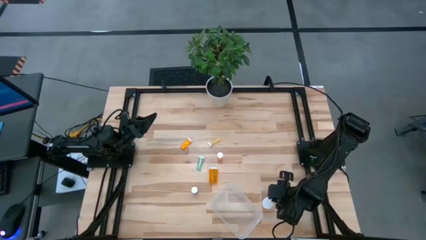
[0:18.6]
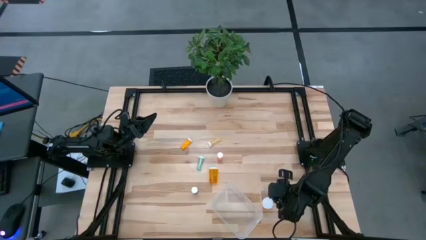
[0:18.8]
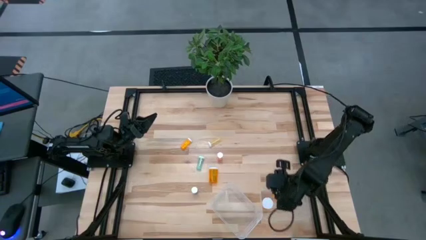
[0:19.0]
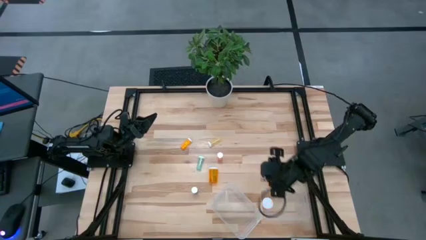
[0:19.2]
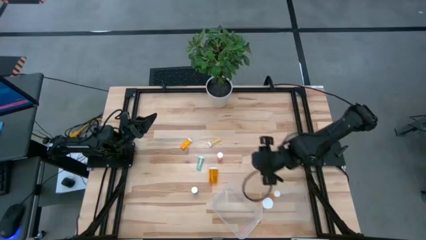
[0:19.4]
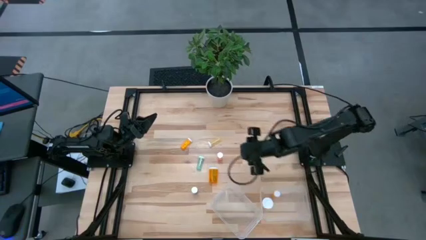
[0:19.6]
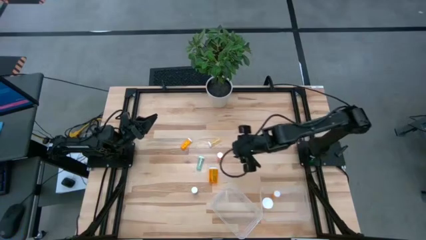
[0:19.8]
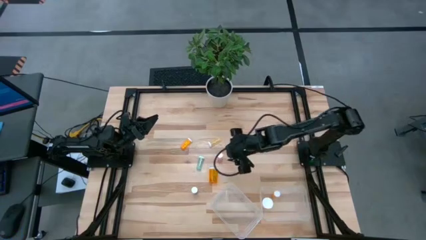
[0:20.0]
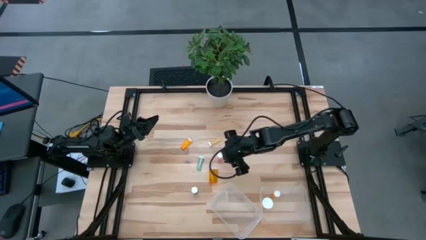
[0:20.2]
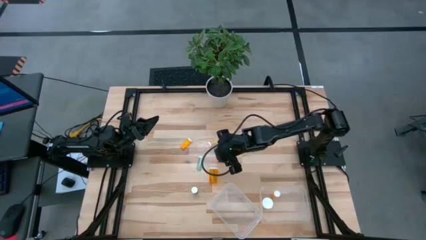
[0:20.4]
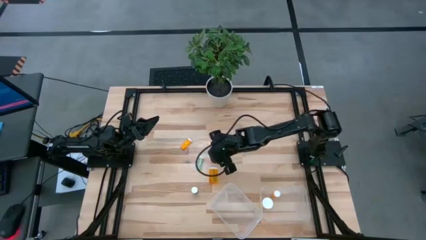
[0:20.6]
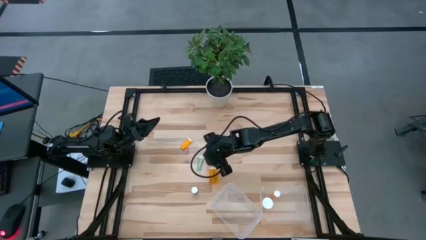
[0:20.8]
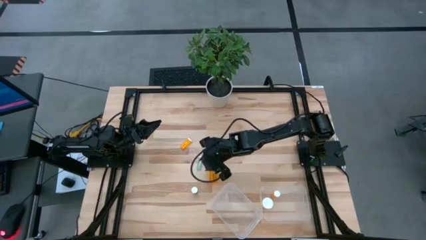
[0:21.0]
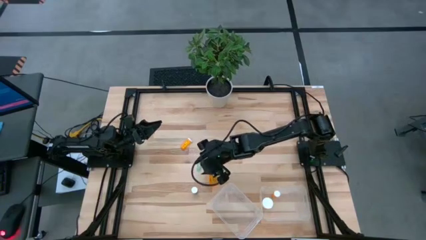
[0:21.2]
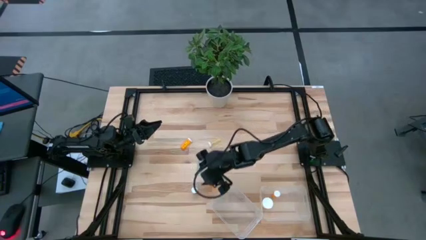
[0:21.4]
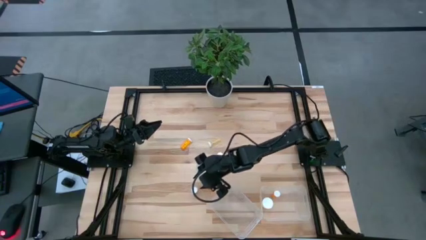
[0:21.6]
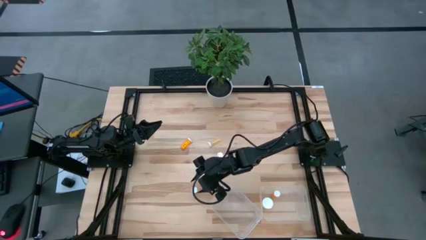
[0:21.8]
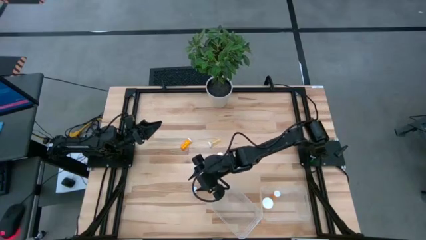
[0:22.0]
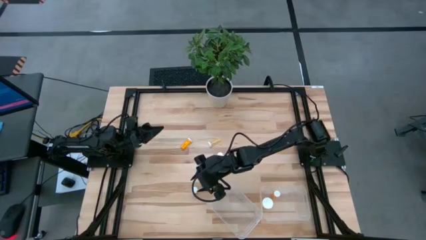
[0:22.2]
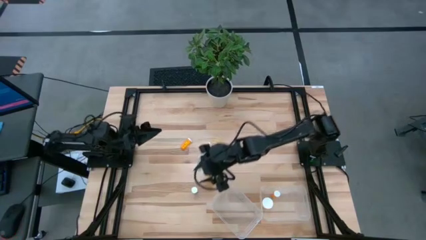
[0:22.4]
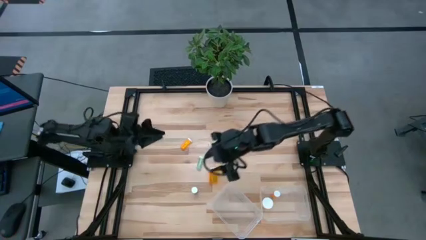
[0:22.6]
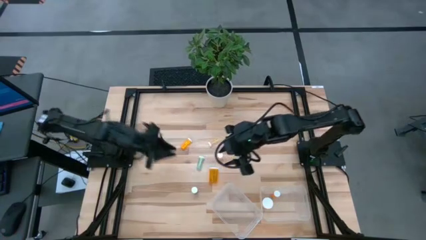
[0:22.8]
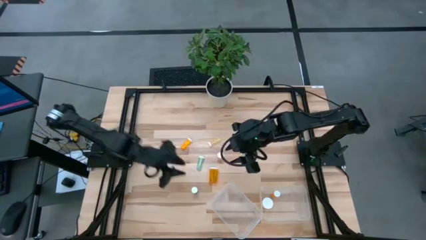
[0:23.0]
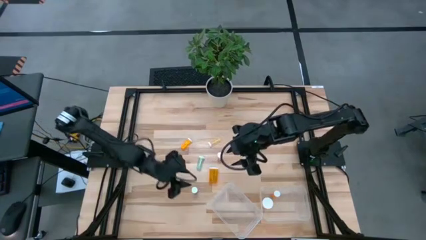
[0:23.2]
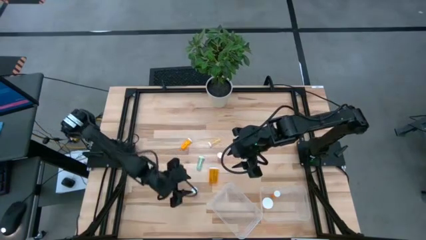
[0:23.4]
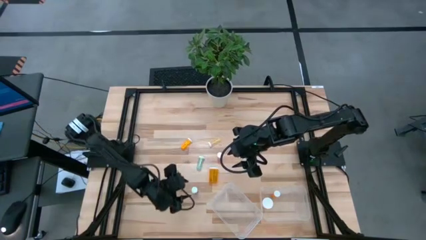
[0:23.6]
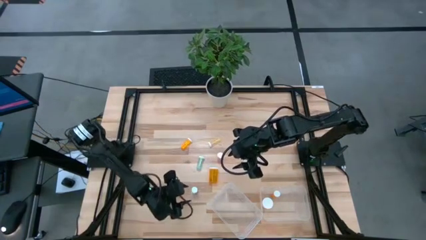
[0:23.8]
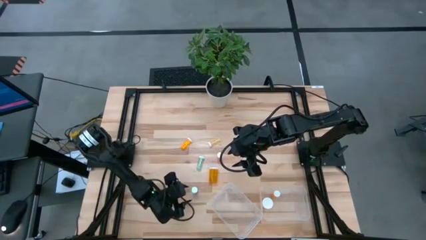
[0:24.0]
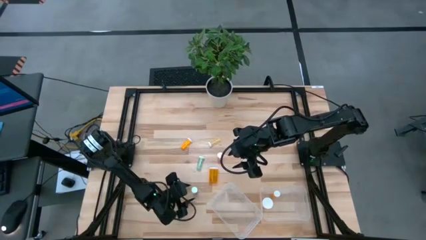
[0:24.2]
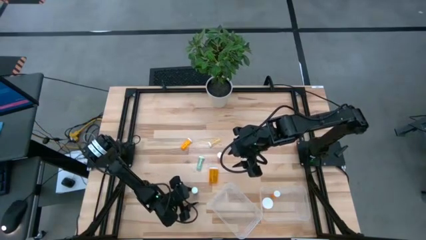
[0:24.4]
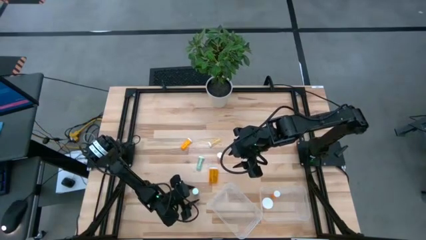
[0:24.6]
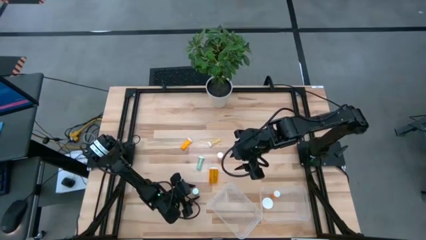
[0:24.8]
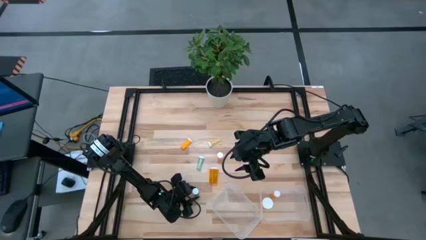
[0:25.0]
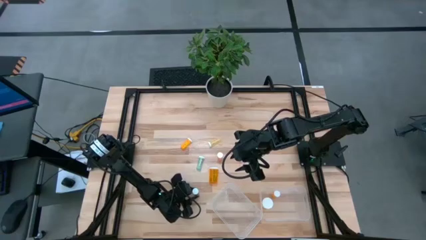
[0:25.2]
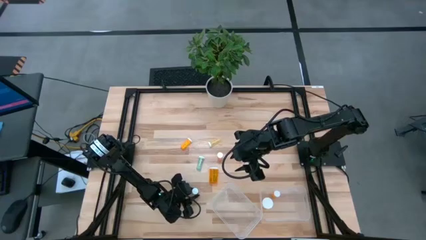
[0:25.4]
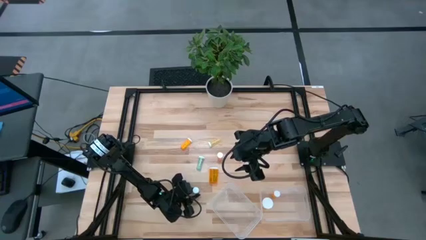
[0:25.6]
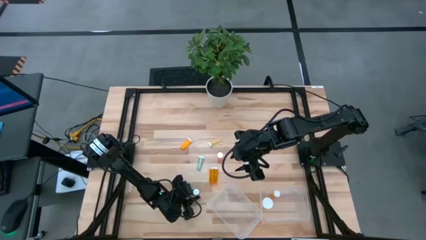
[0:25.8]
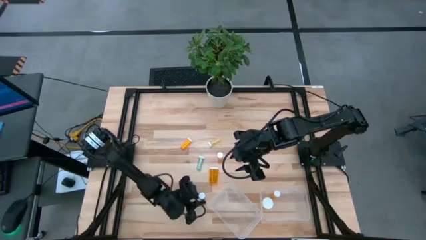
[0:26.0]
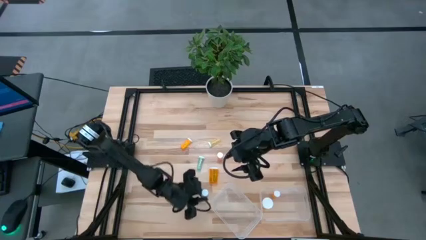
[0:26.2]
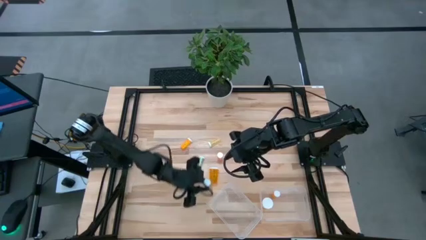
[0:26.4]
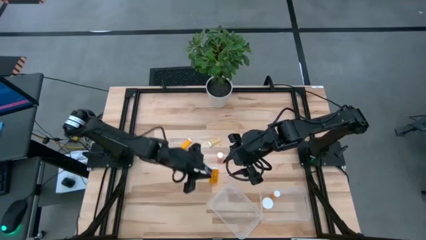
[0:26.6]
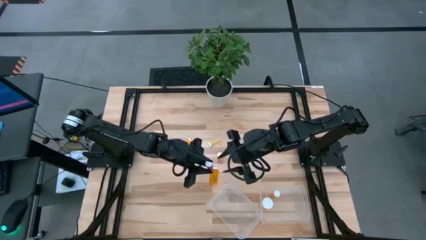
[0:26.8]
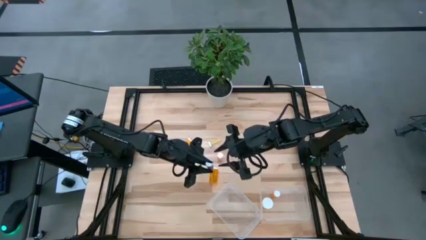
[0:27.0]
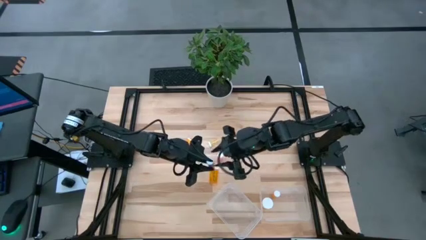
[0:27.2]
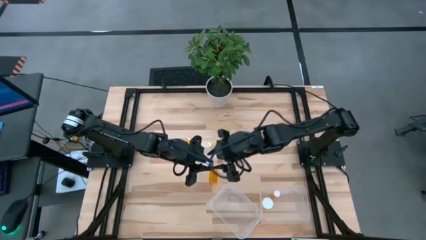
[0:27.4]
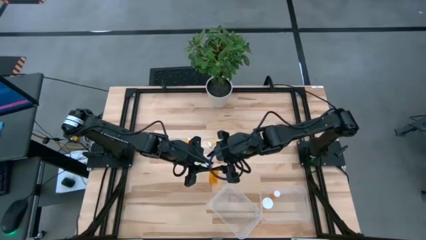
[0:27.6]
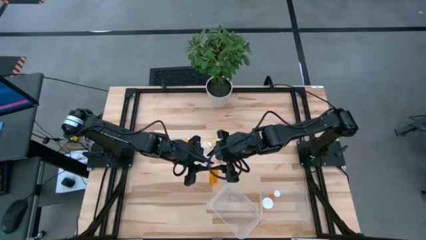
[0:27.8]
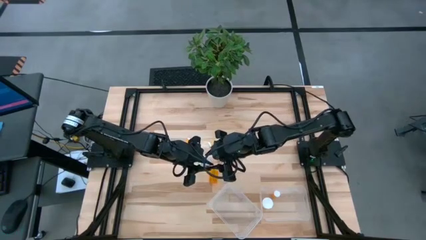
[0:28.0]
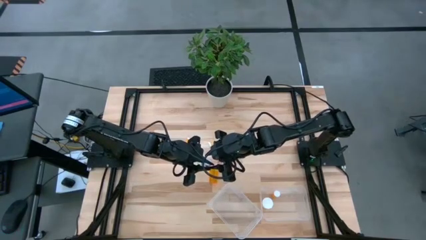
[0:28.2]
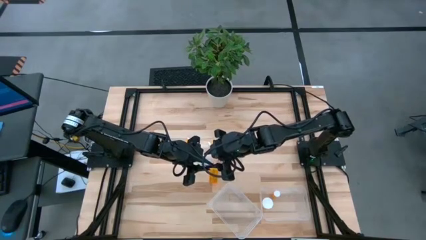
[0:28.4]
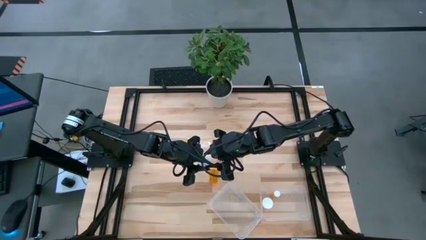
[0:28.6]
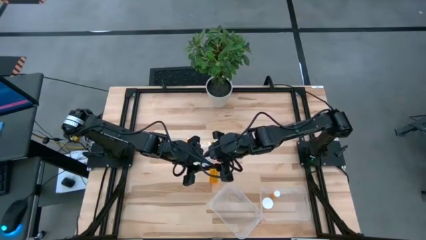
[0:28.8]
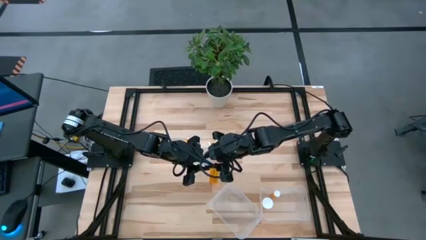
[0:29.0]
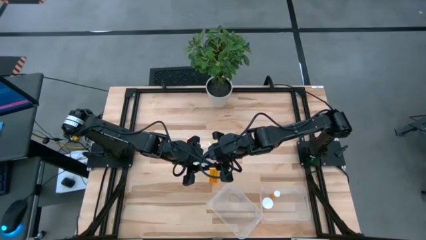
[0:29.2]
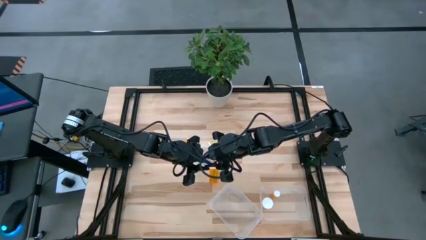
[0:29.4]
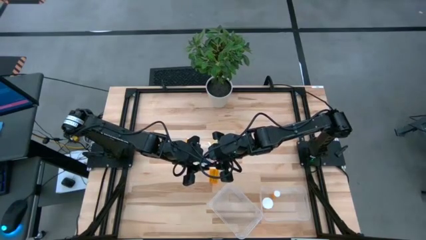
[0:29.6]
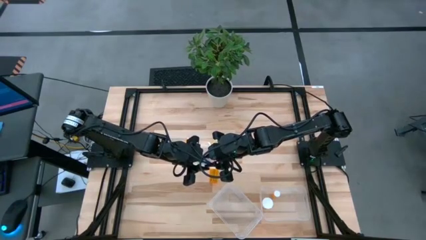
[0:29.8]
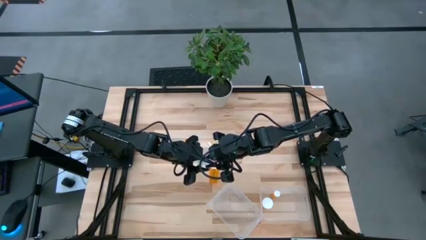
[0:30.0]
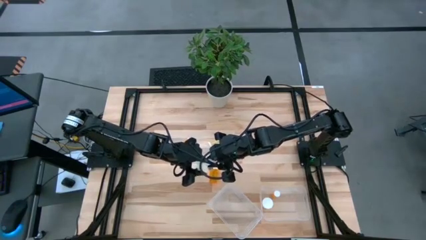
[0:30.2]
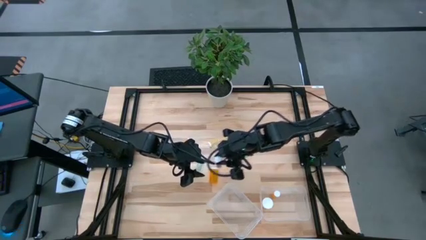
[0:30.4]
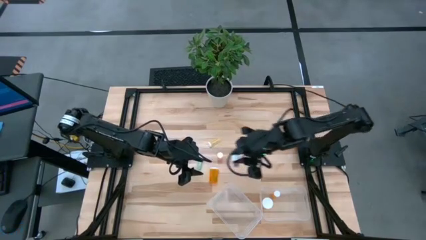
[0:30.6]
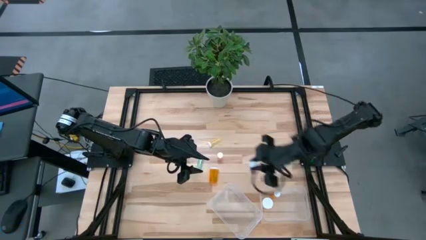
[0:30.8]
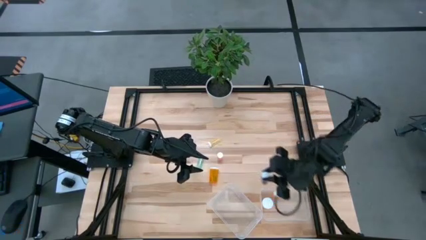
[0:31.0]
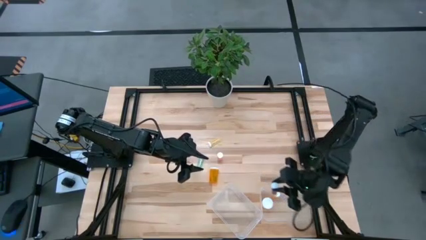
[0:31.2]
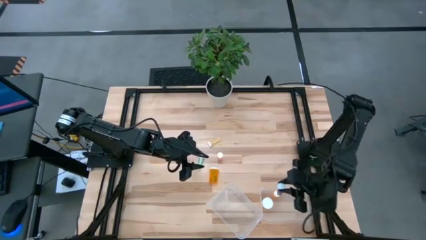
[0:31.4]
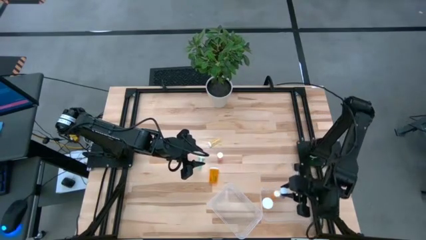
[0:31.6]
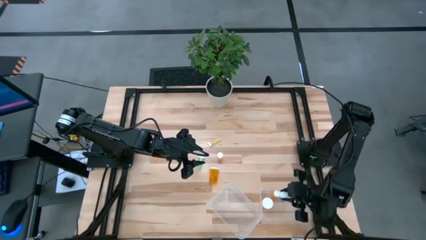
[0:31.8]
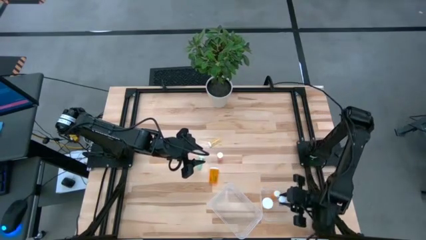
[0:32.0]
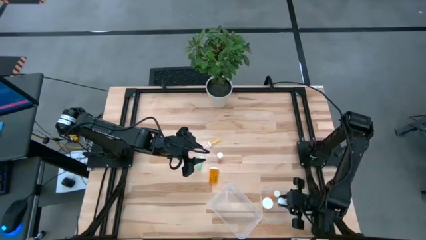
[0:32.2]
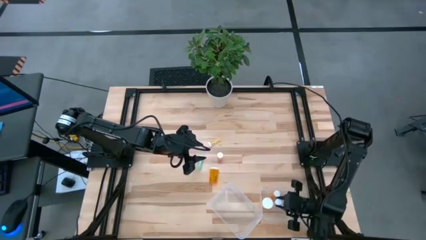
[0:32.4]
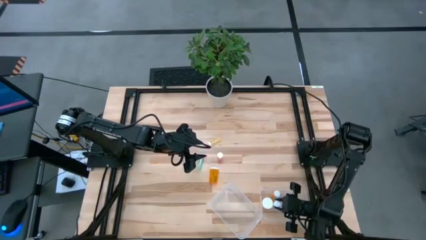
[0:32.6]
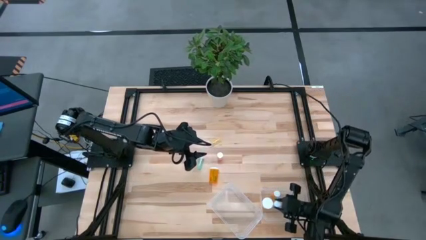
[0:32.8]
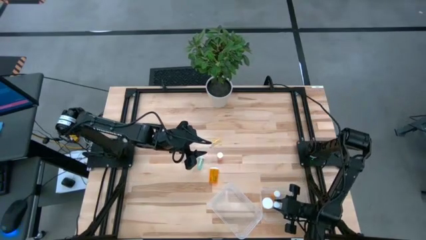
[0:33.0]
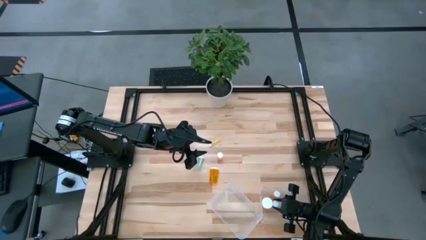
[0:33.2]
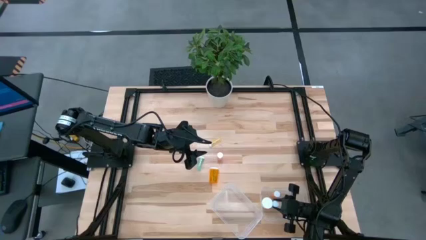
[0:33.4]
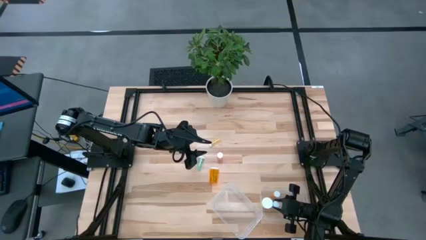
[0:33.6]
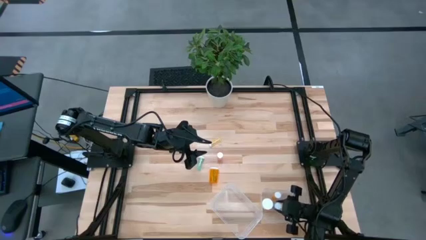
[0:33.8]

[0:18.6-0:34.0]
Task: Pick and place medicine bottles into bin by pill shape (circle, oval)
Put the bottom blue green pill bottle into the right transparent bin

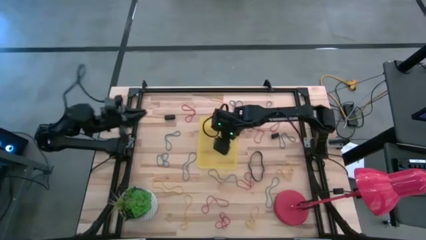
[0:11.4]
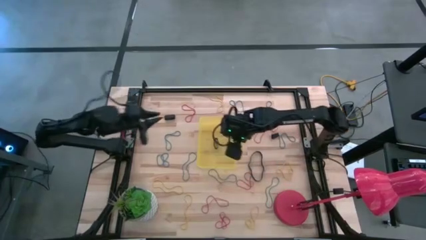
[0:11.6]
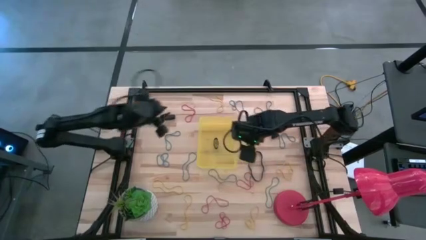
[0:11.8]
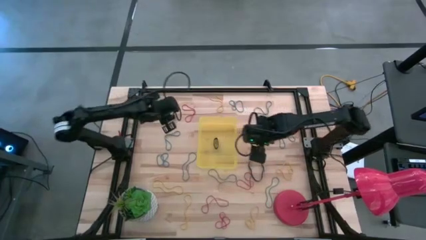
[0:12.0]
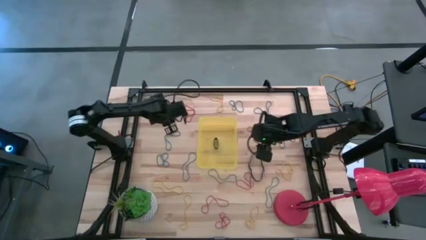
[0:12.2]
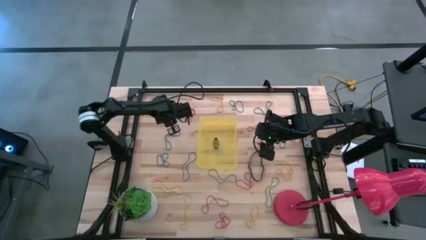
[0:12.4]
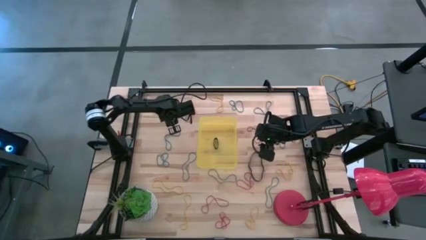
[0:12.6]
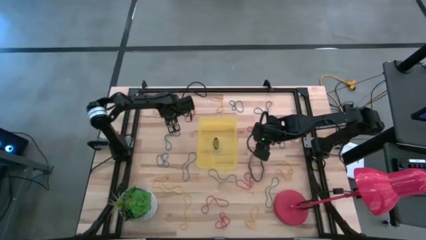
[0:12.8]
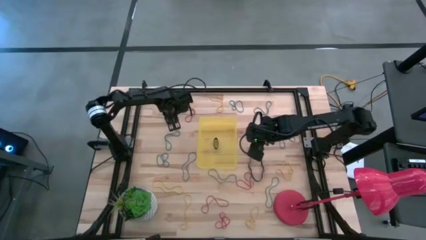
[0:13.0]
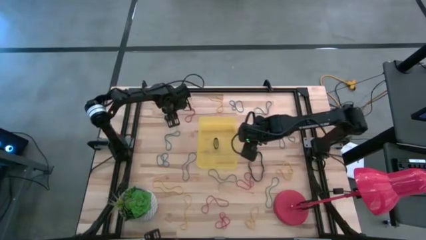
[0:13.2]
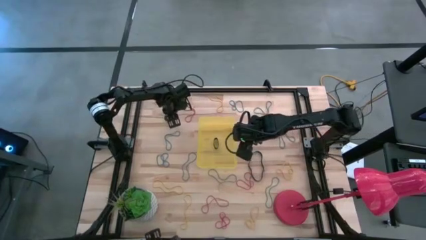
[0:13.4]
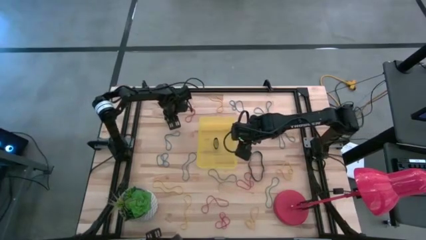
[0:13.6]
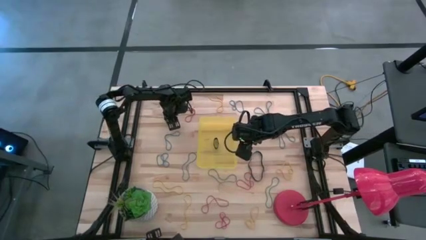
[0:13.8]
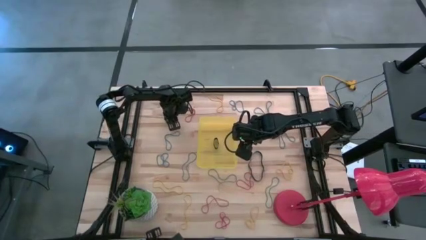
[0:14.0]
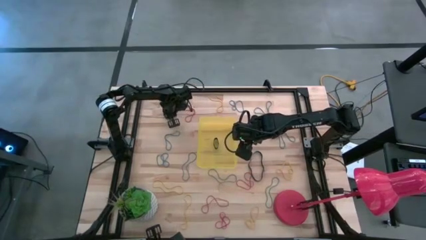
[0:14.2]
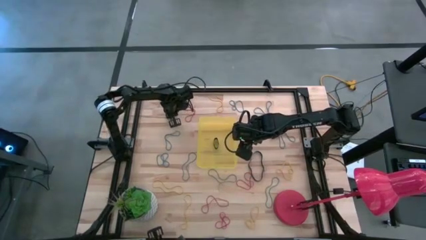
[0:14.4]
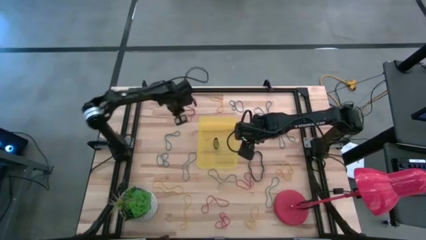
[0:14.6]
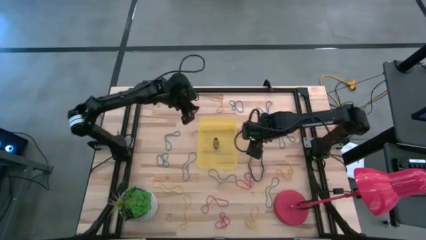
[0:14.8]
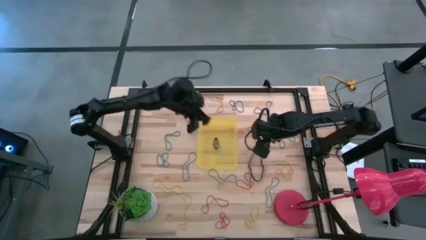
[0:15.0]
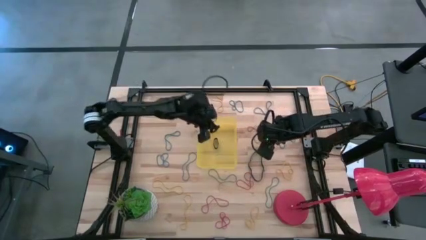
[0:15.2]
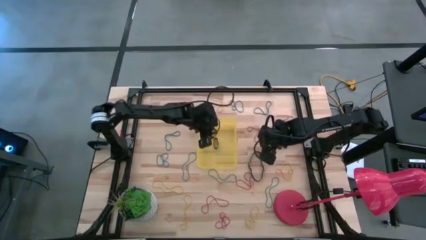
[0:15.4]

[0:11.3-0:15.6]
Task: Pick and place rubber bands into bin
Put the black rubber band into the yellow bin
